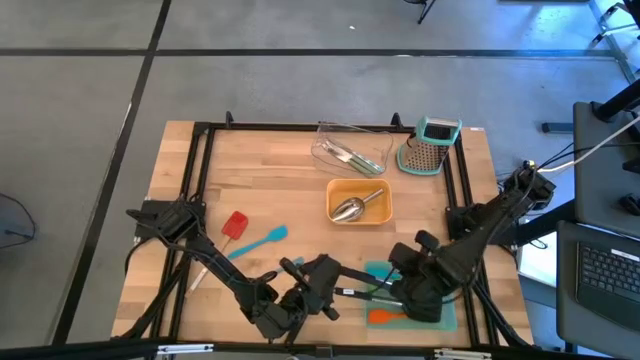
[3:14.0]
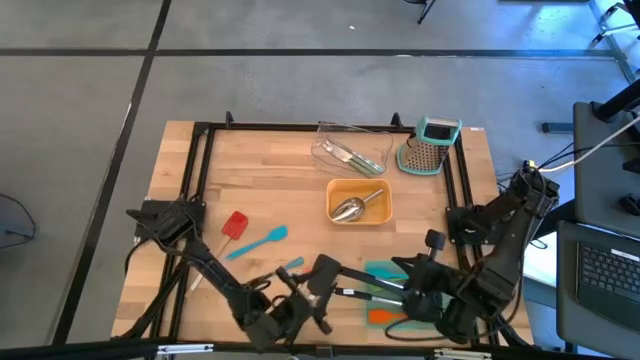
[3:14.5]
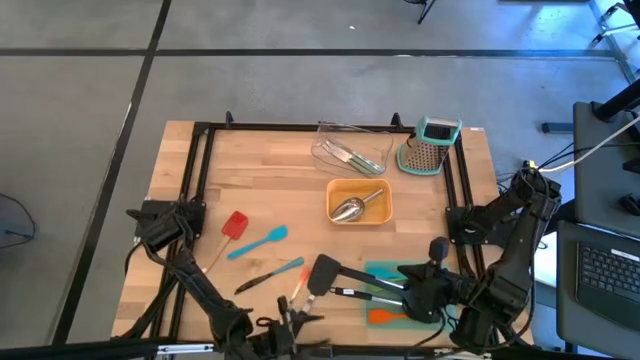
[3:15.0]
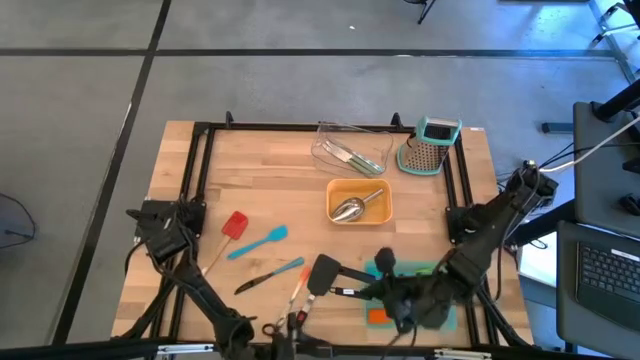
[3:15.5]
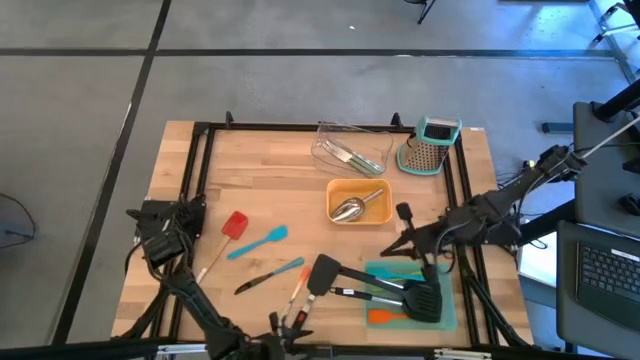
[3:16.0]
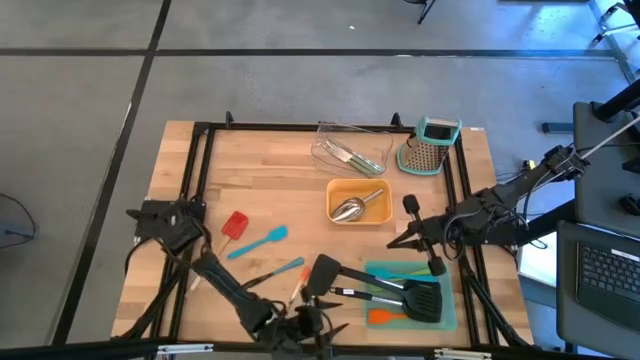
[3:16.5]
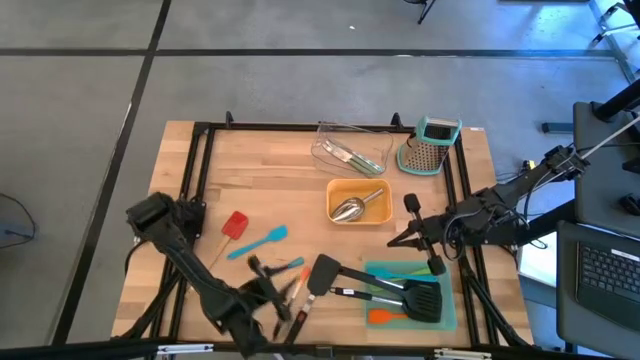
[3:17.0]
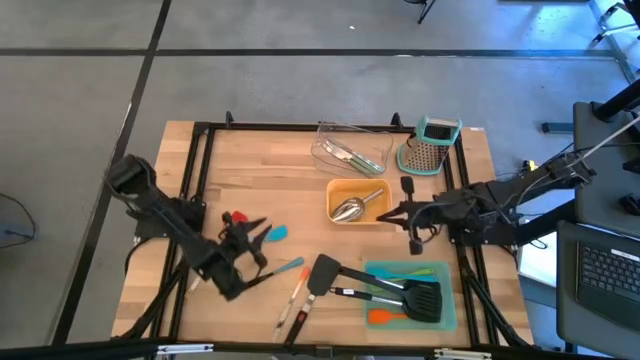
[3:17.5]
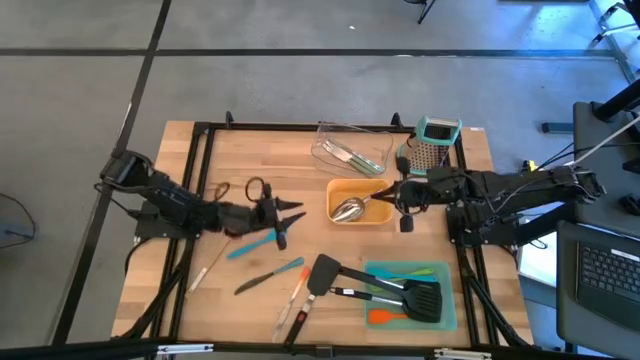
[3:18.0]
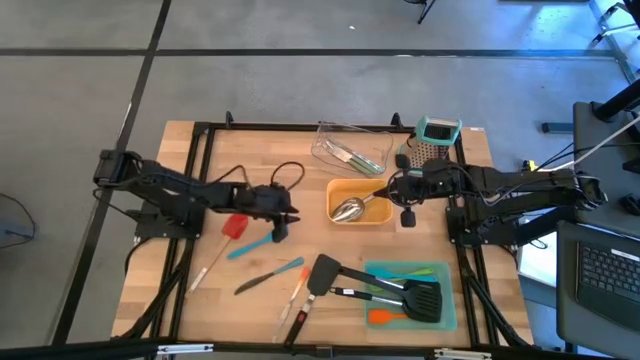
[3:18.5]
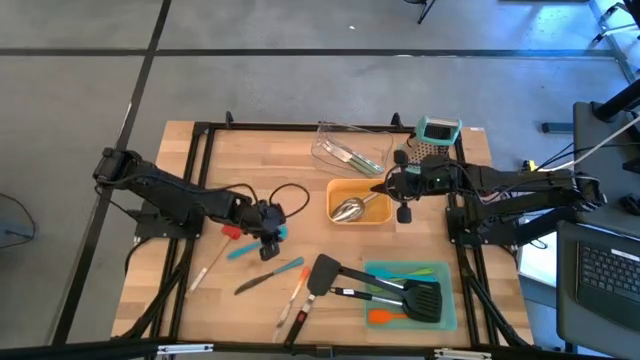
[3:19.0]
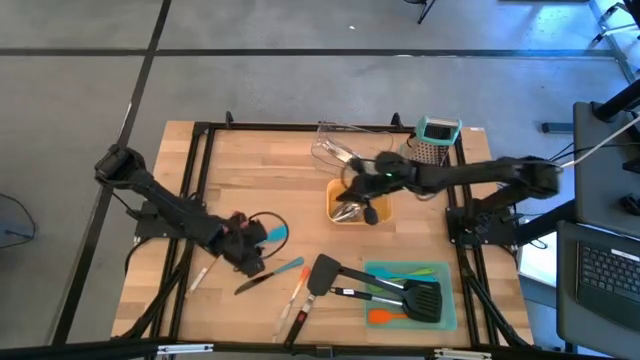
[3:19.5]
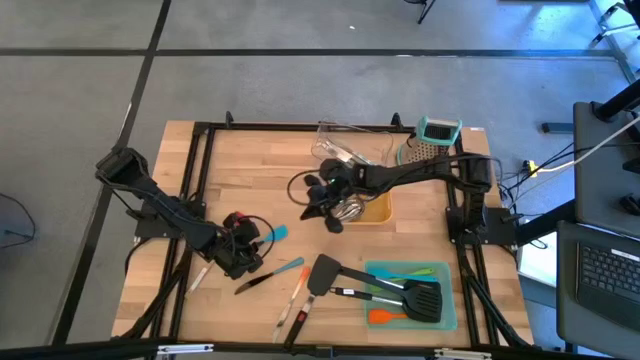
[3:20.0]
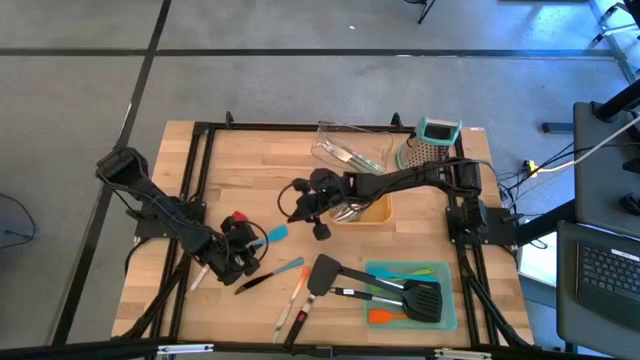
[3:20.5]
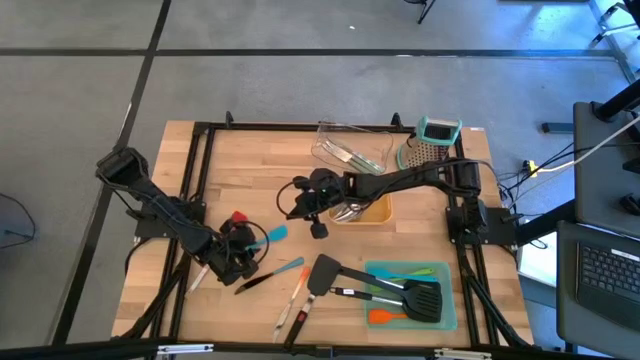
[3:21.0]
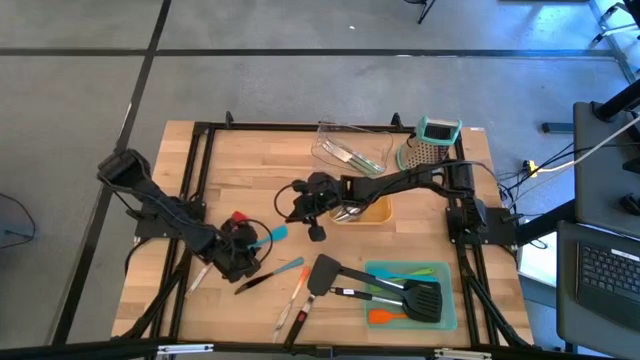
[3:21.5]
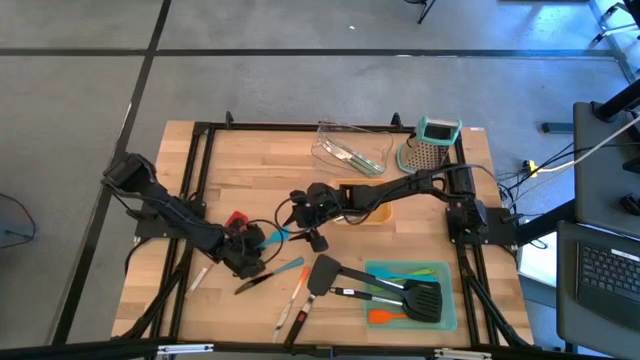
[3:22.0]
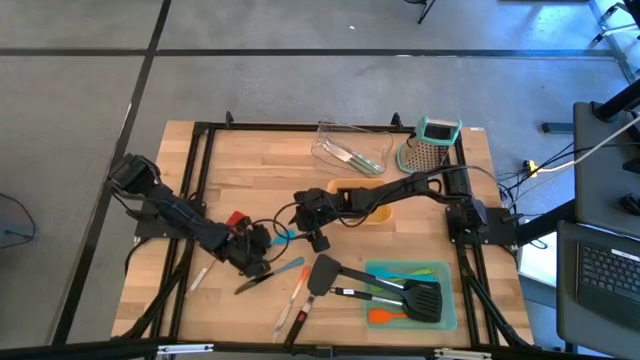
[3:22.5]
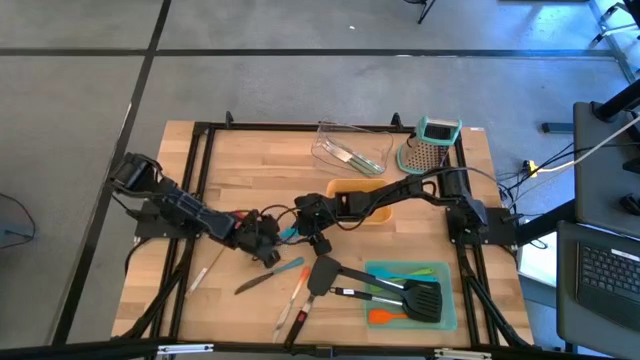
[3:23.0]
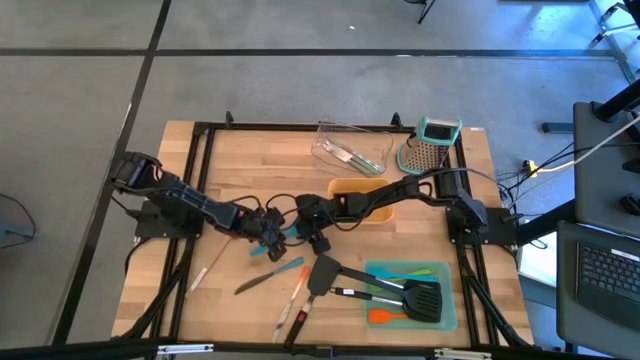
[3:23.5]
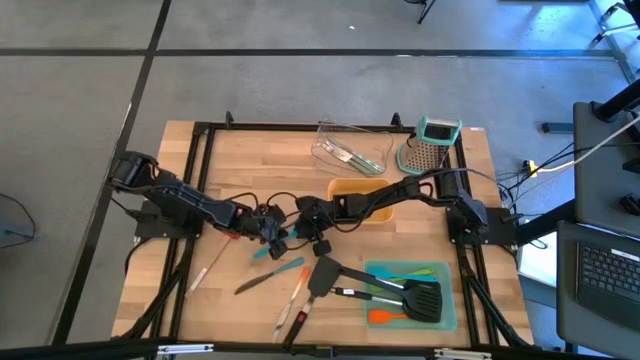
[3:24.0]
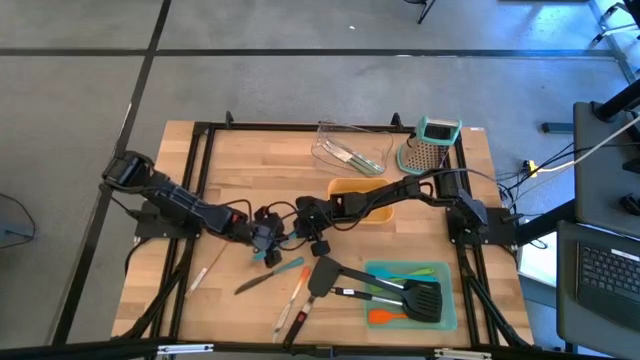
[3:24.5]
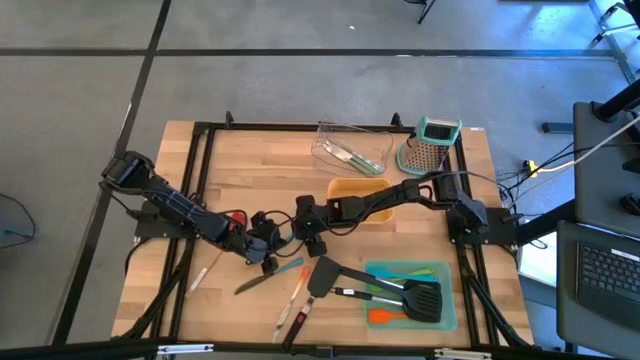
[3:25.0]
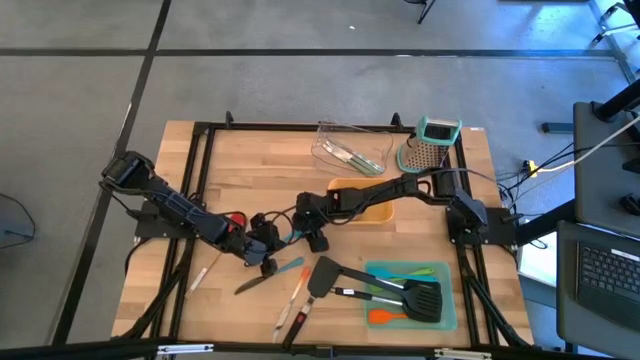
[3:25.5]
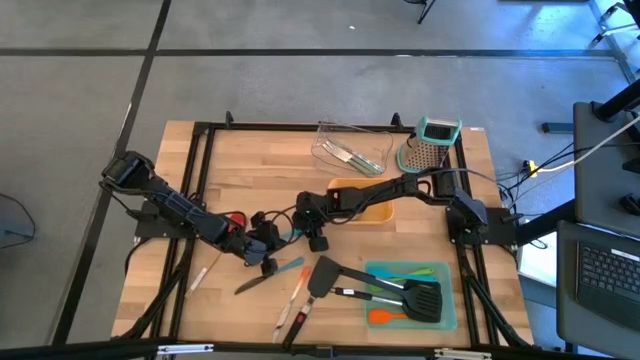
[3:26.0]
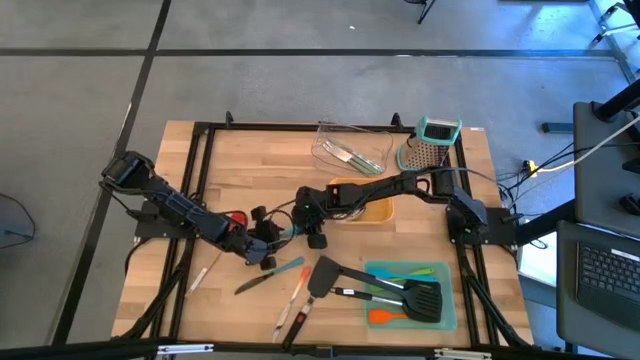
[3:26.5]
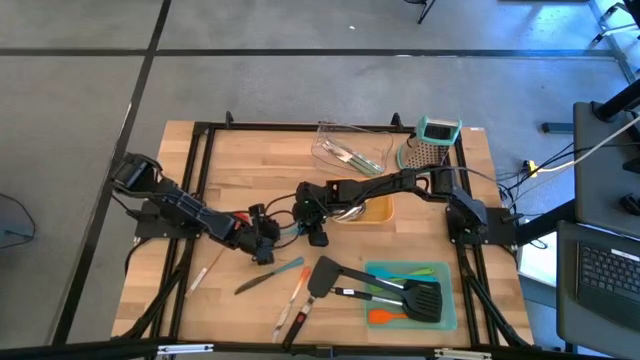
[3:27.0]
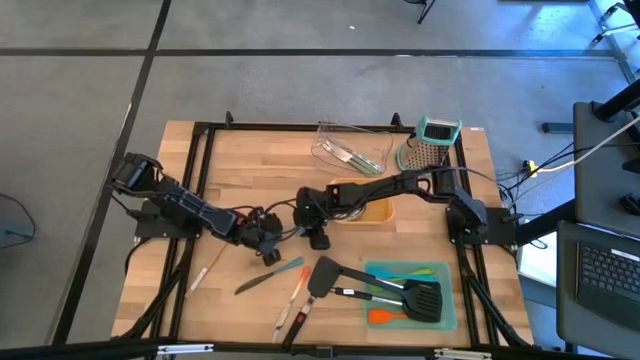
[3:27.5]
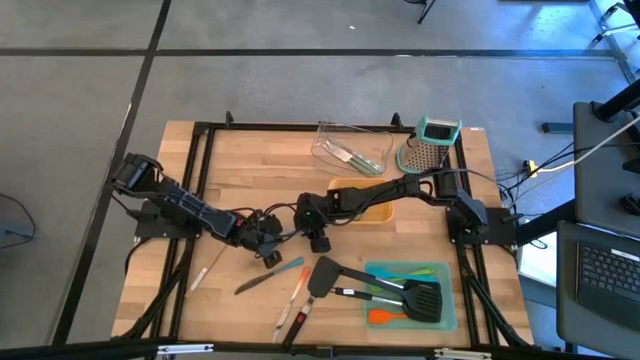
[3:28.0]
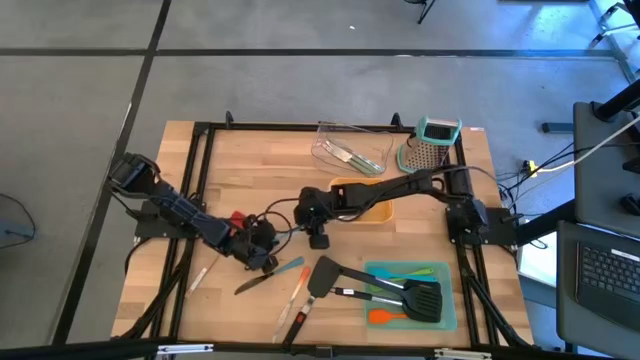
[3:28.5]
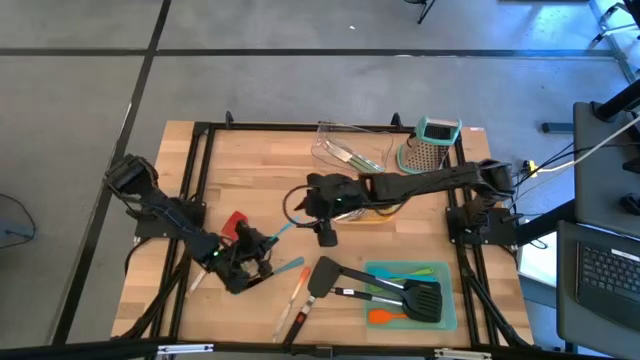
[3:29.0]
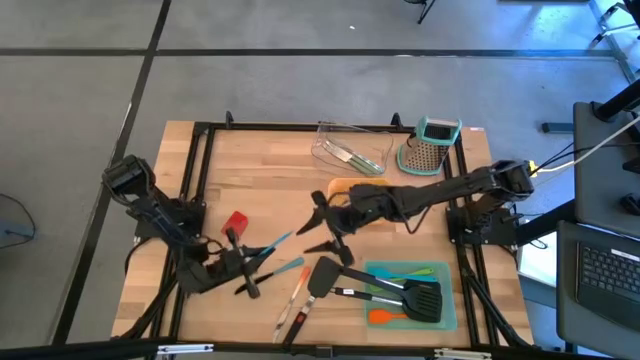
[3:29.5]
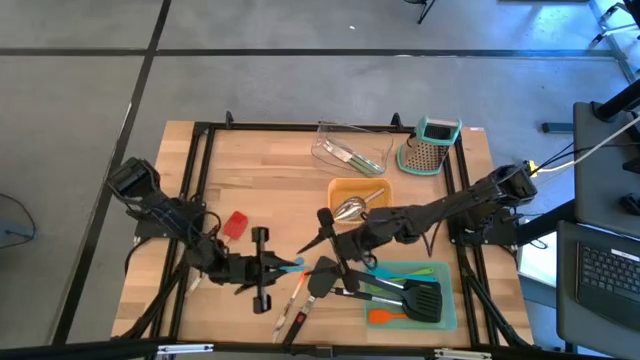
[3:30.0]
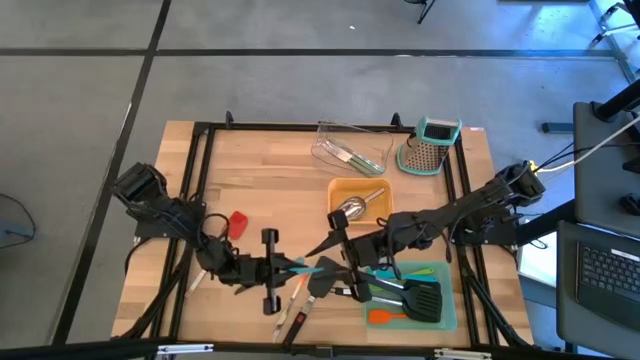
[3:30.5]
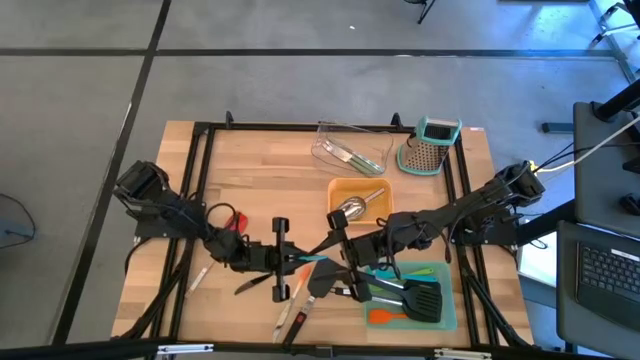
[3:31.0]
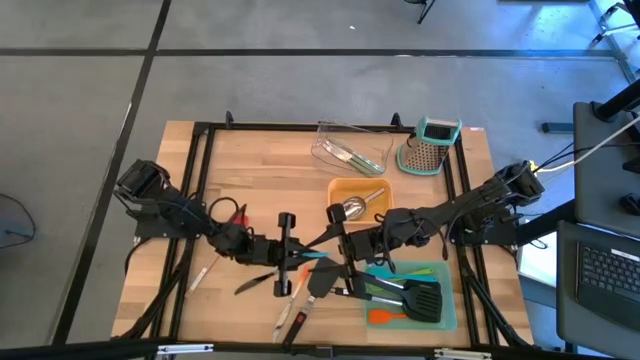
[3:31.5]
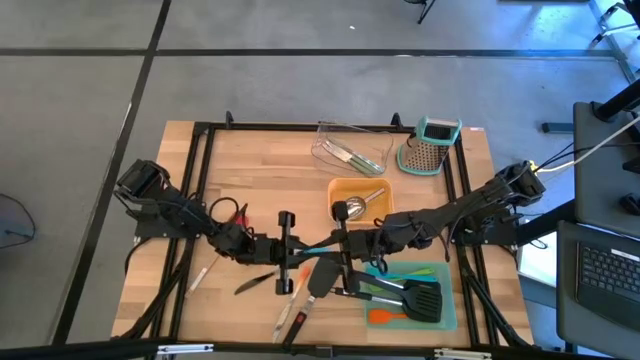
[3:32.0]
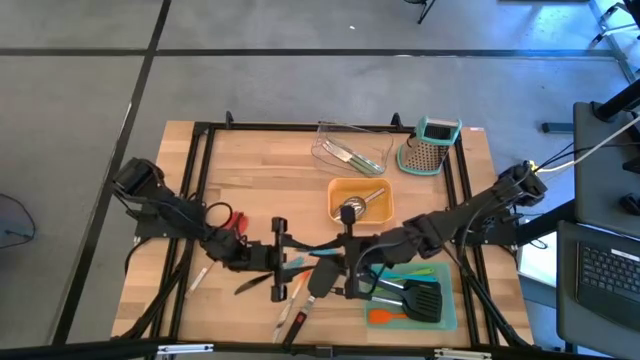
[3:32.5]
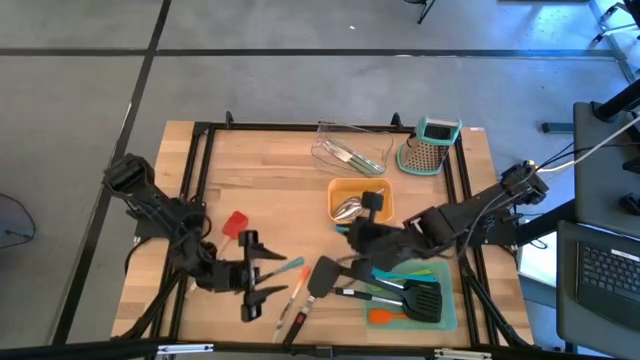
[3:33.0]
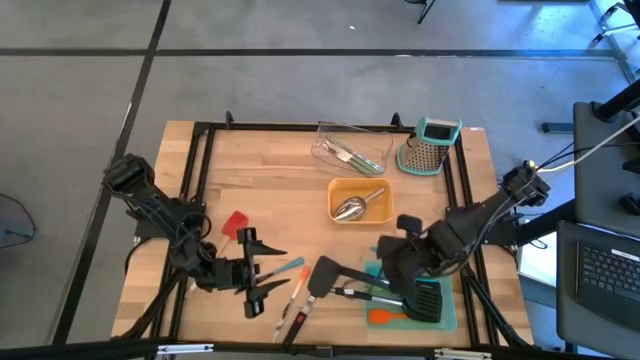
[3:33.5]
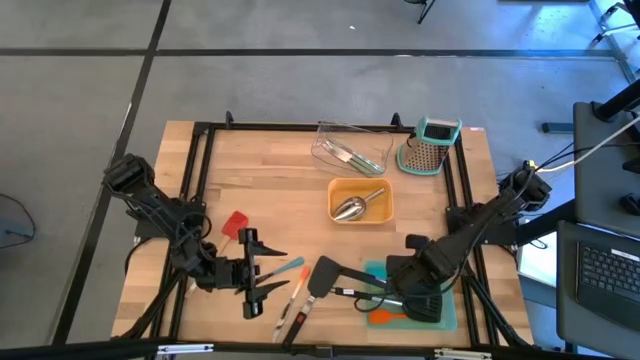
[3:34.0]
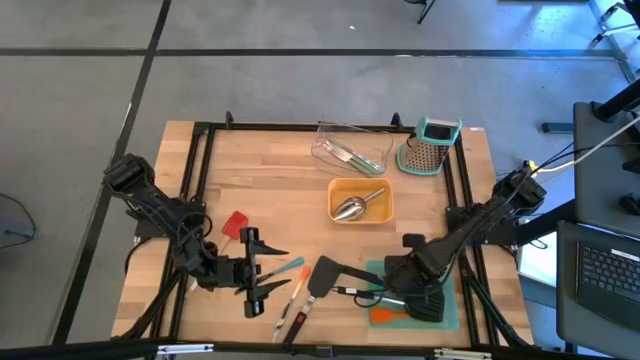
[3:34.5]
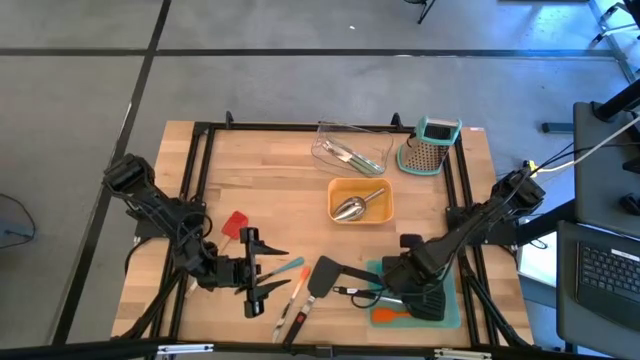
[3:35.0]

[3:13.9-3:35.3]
Task: Pick & Place Kitchen Items
Put the blue silicone spatula into the green bin
